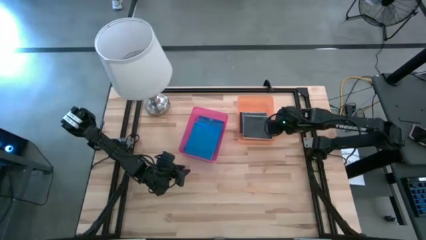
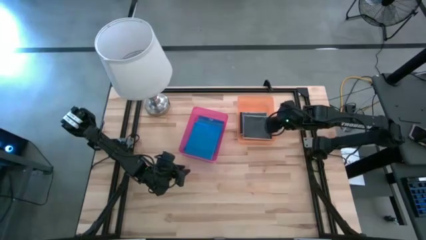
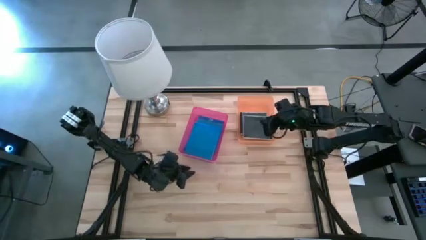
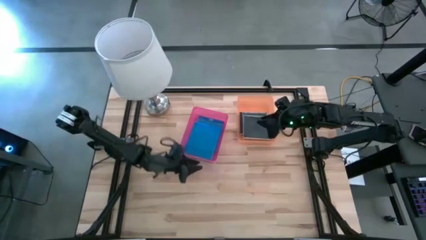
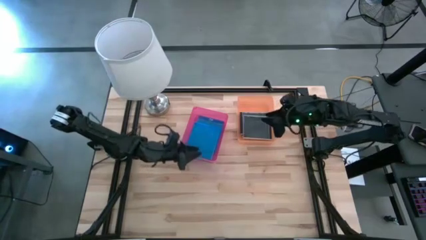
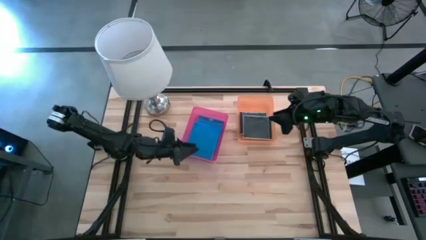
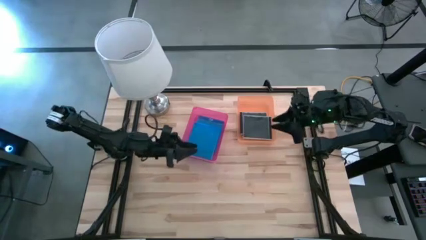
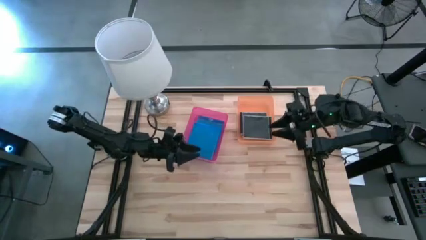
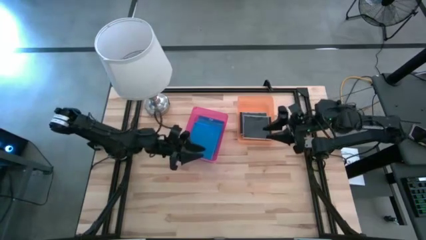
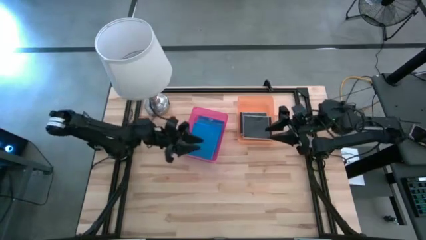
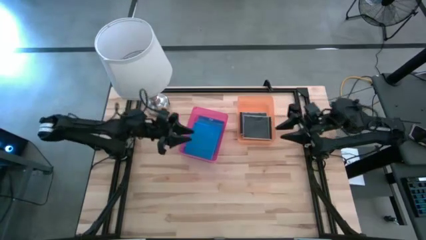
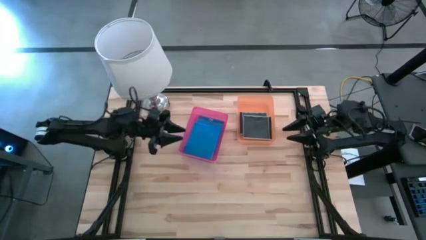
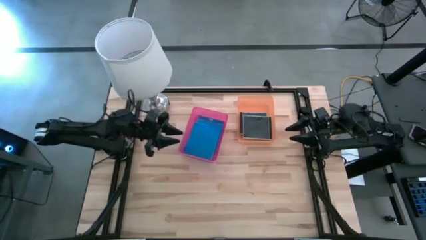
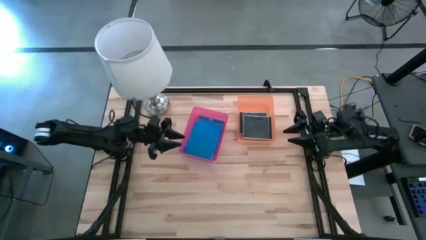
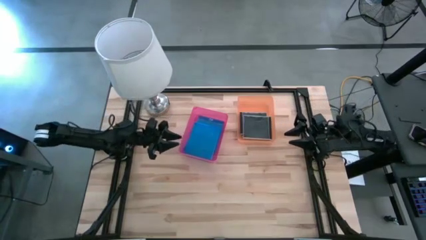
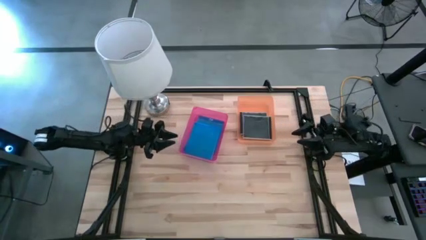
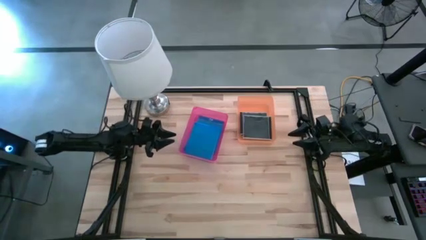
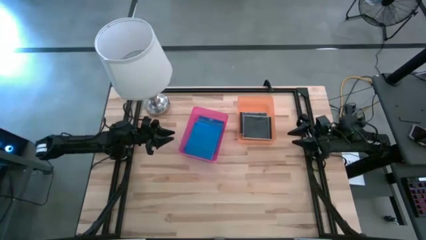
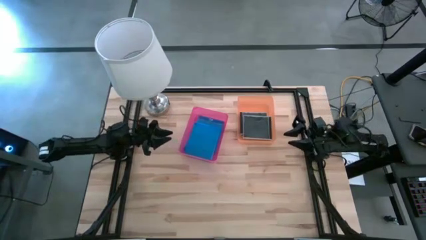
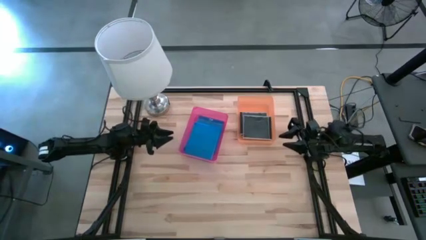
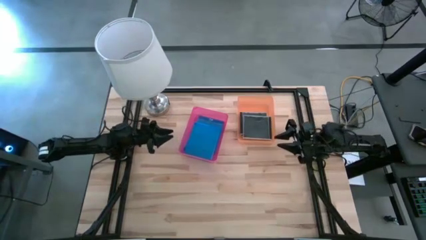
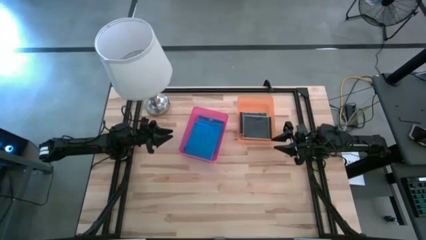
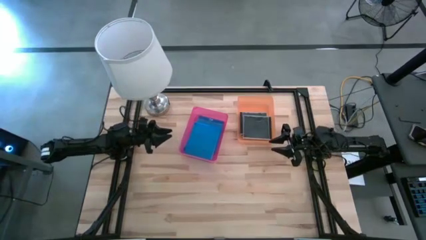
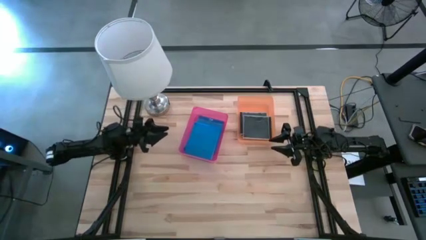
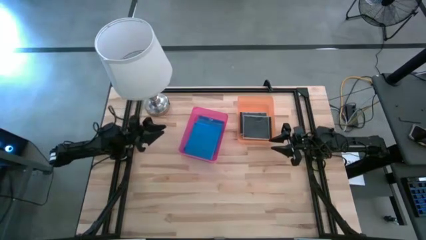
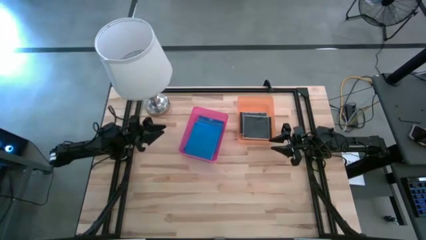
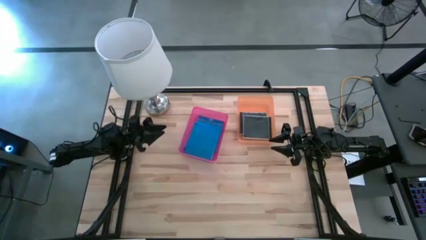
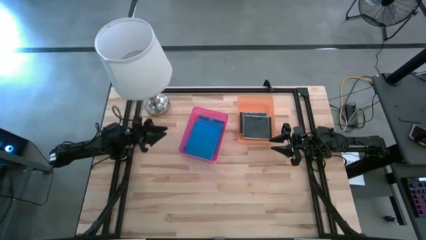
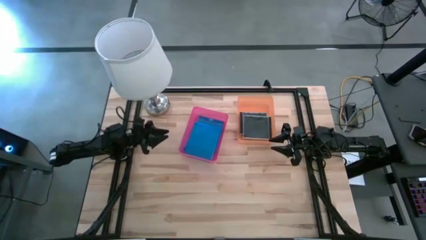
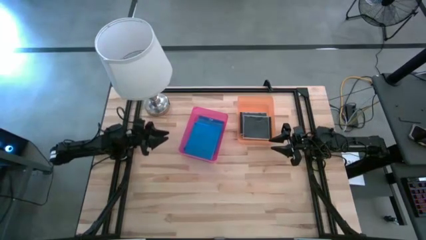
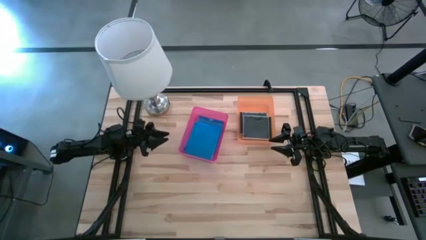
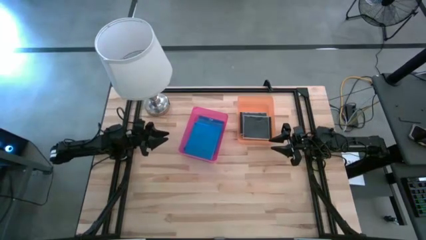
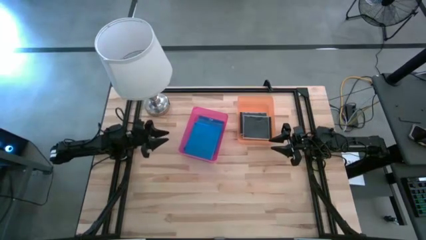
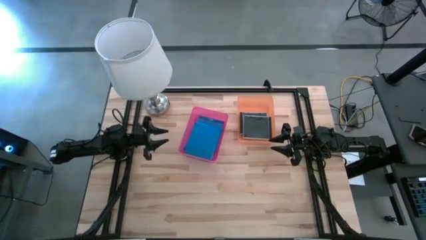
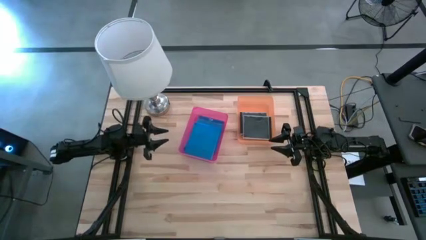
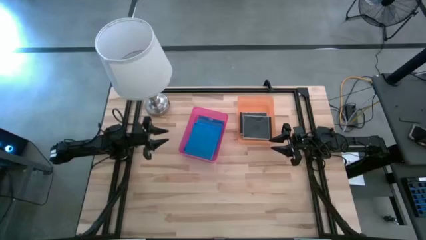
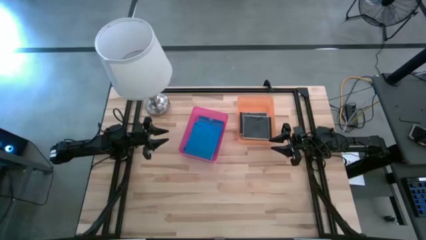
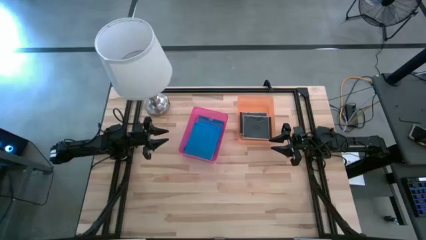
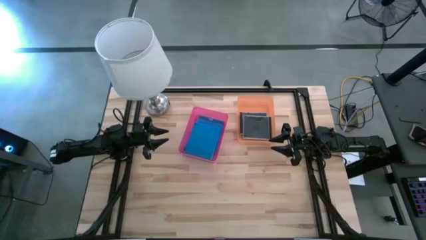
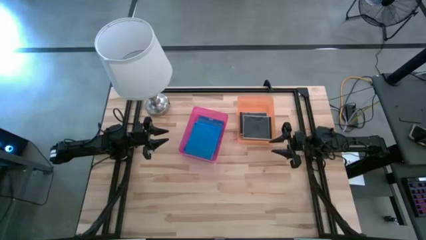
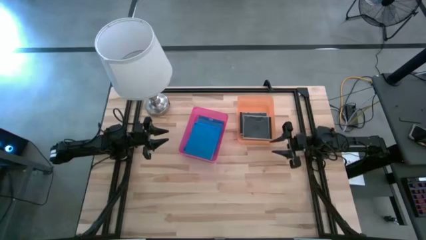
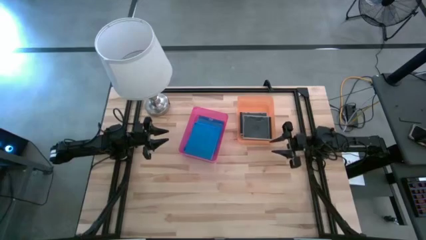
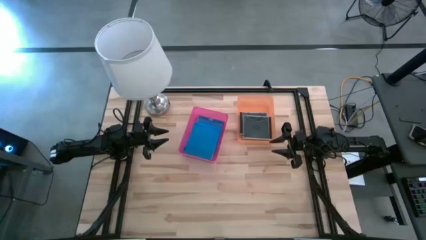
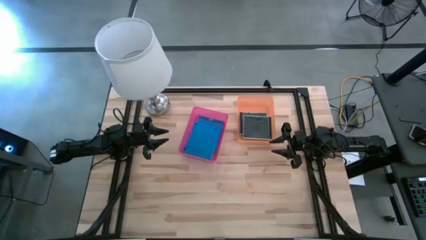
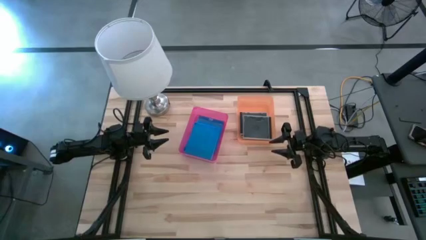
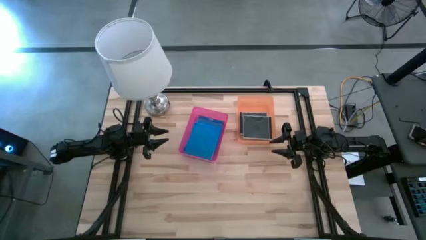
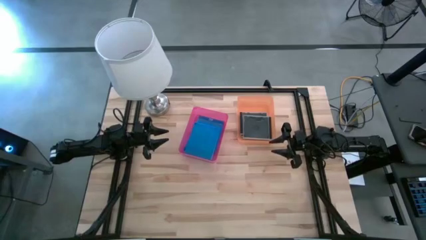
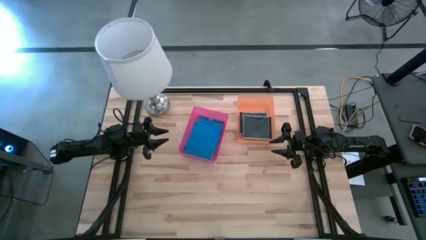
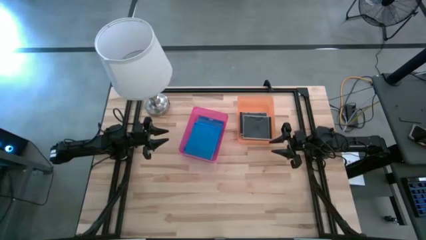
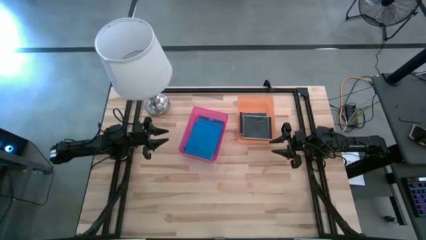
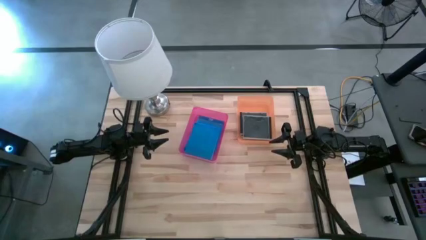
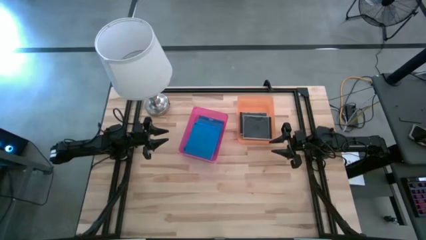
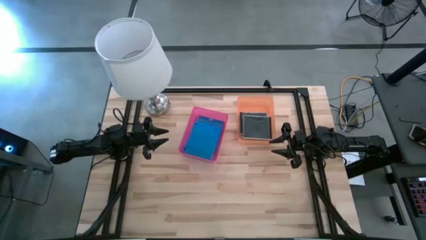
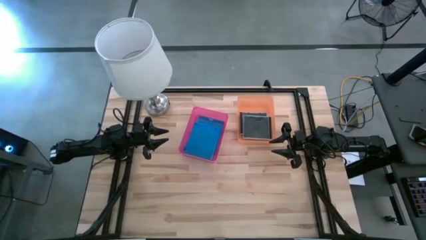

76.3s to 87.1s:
Task: Pick & place jewel cases by type
Return to Home Position

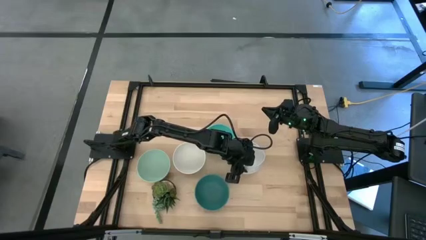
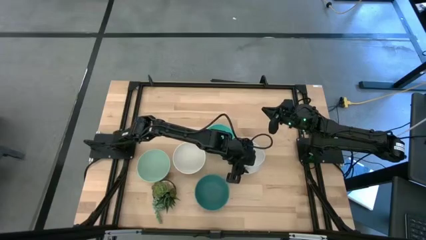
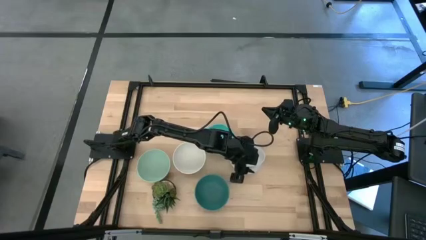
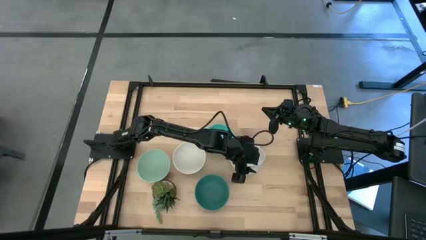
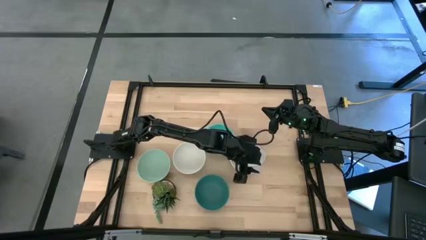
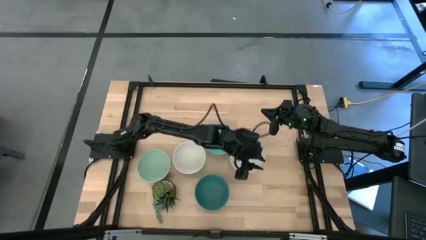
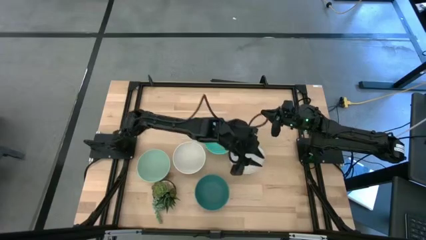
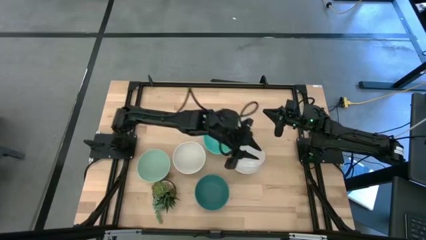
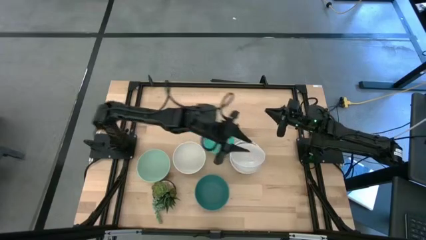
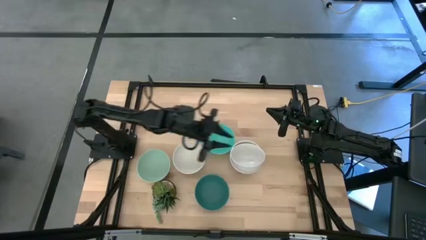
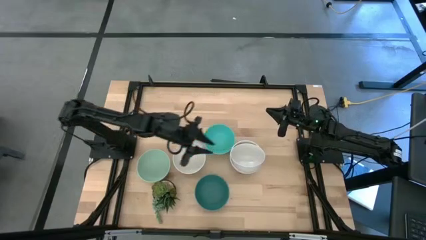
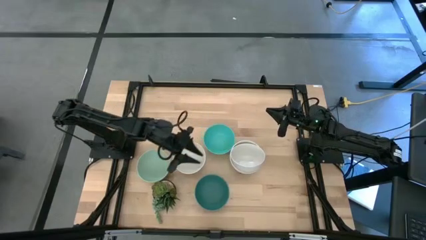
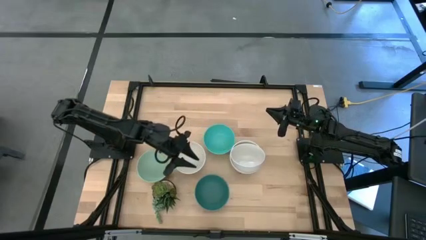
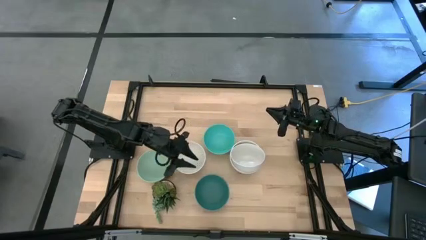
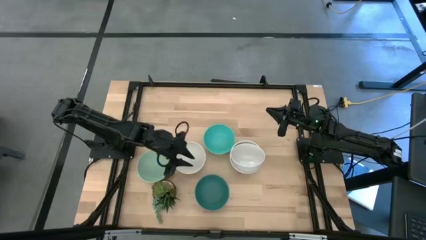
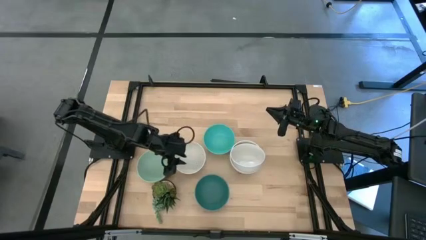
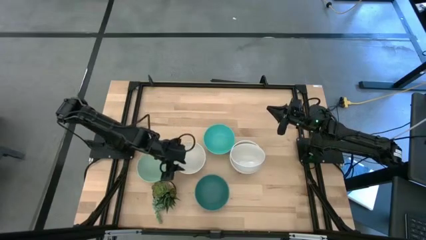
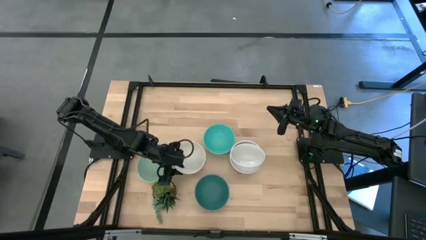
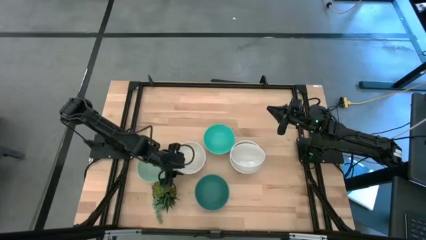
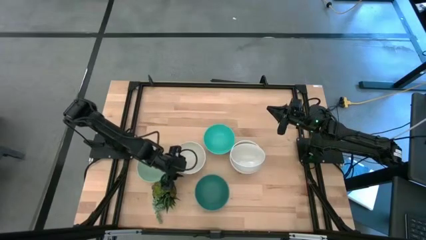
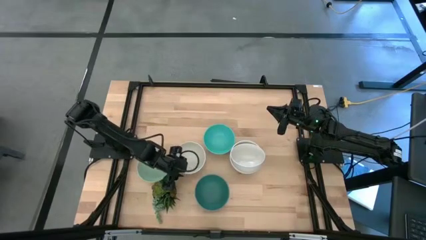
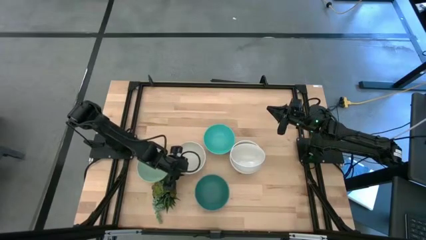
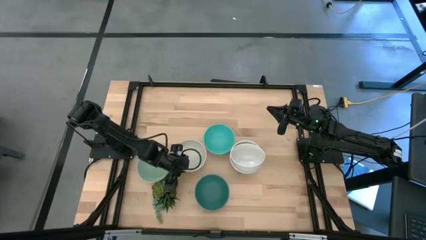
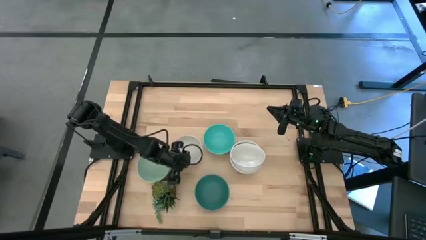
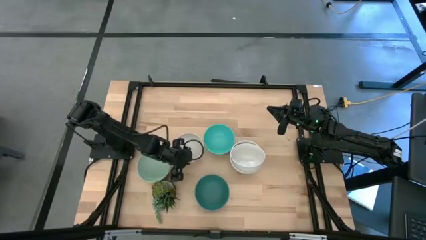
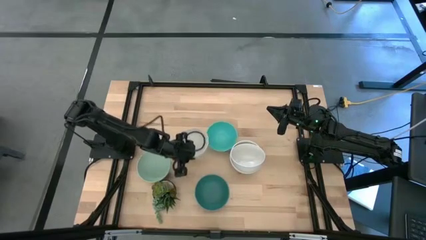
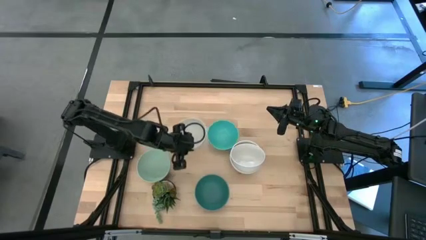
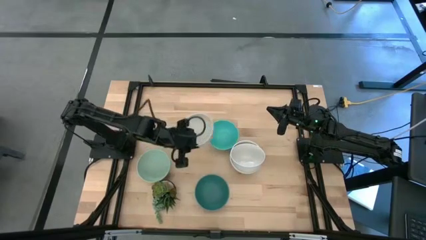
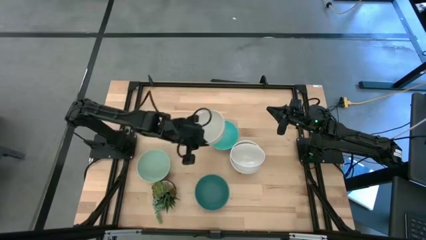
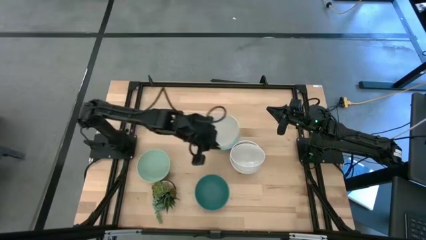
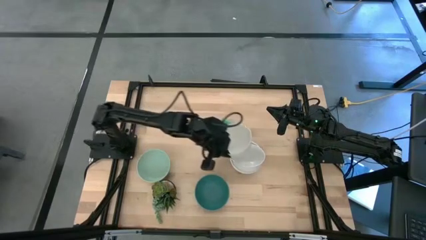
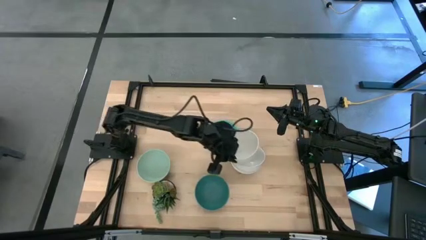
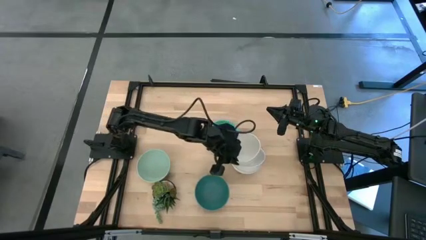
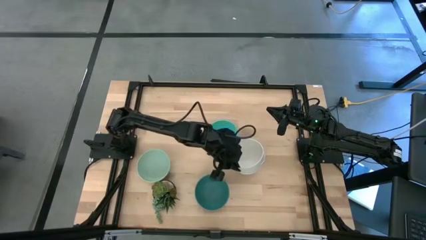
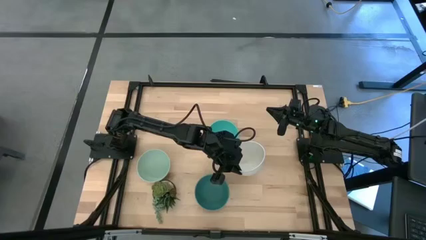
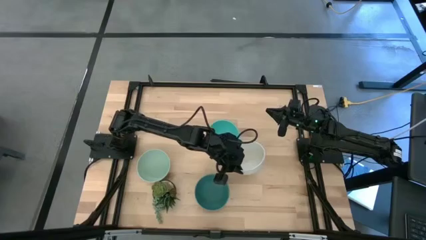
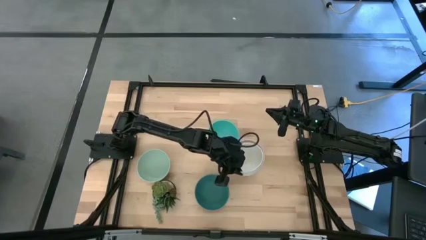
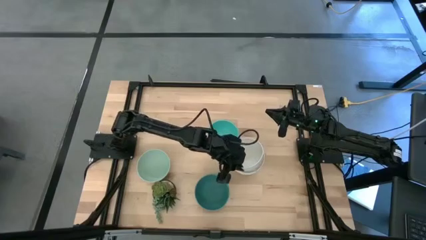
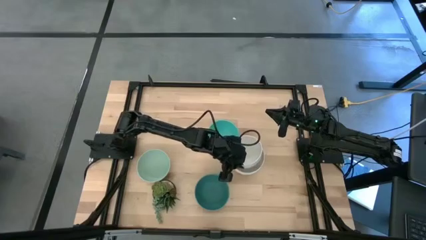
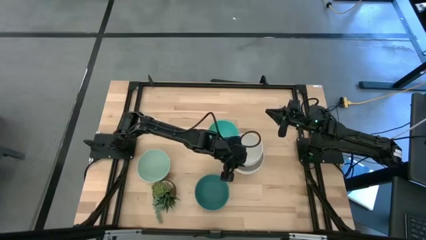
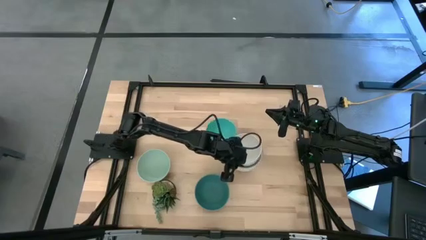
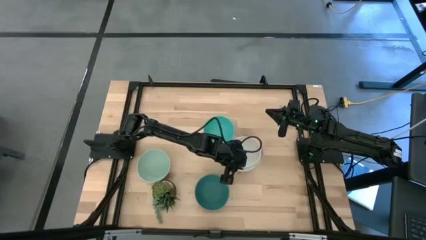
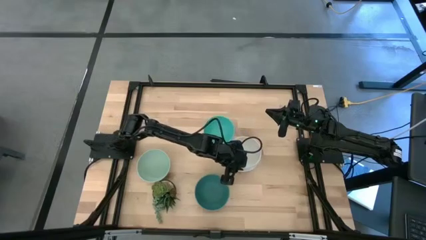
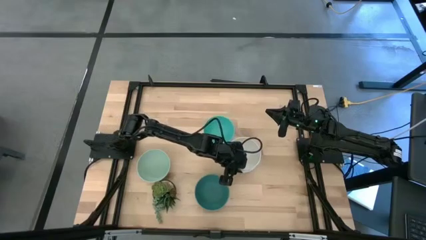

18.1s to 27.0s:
Task: Nest bowls inside each other
Stack the left white bowl on the right white bowls
